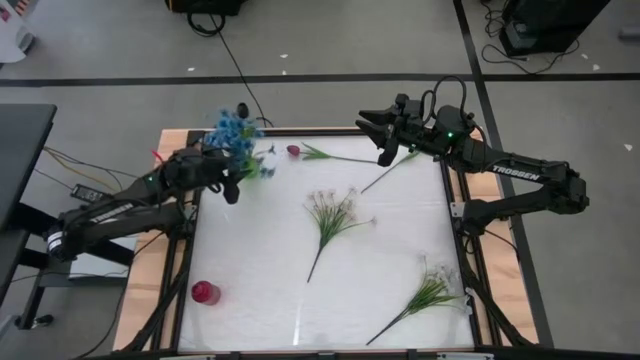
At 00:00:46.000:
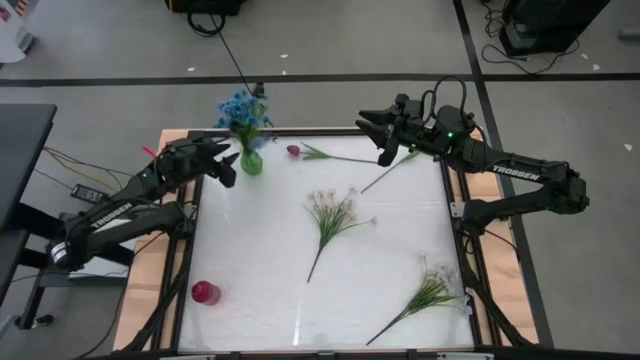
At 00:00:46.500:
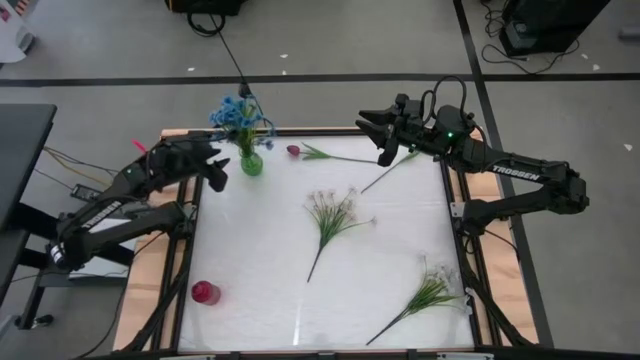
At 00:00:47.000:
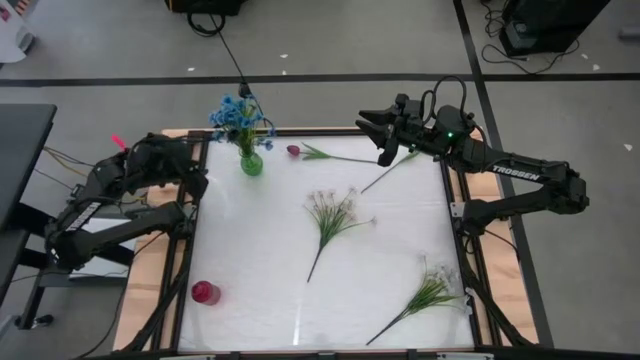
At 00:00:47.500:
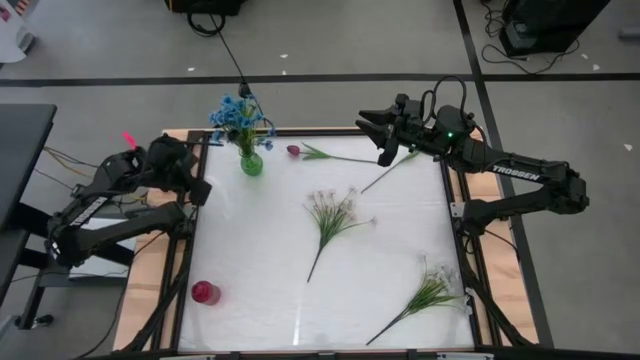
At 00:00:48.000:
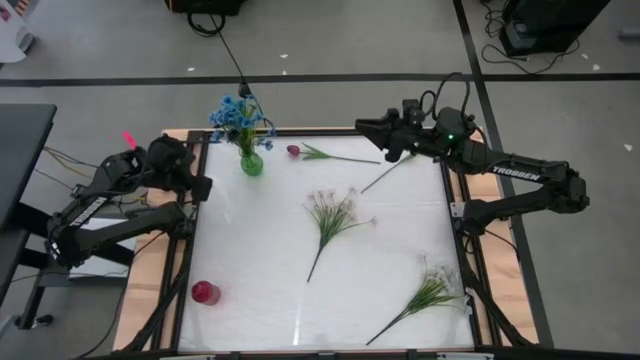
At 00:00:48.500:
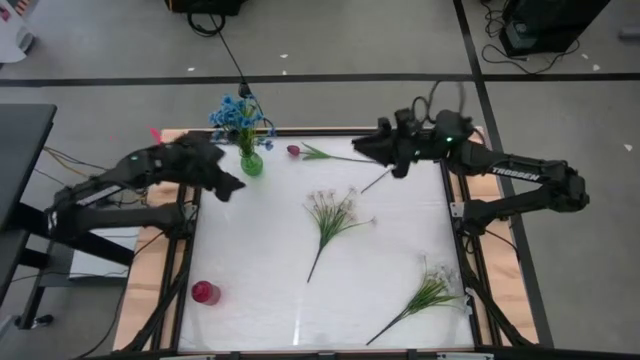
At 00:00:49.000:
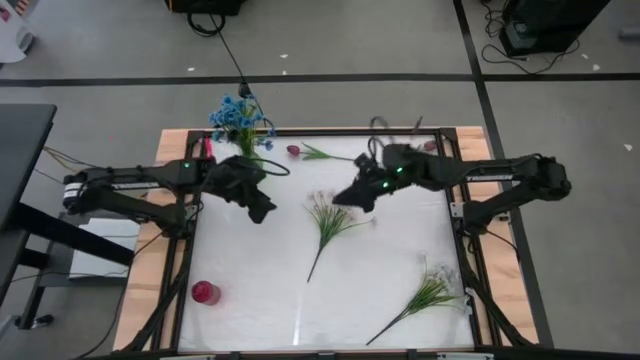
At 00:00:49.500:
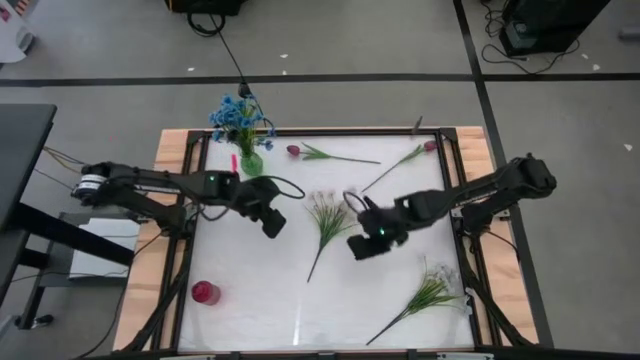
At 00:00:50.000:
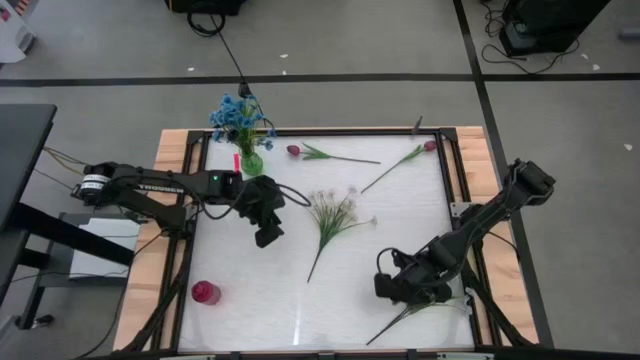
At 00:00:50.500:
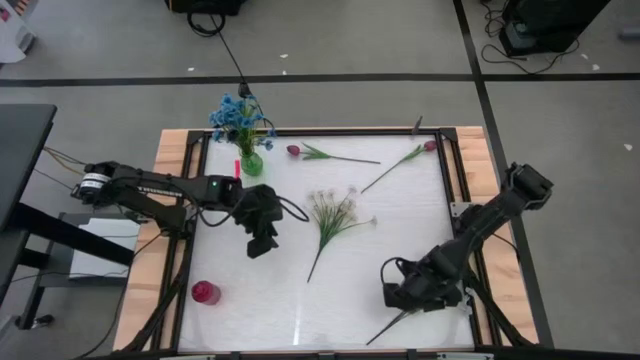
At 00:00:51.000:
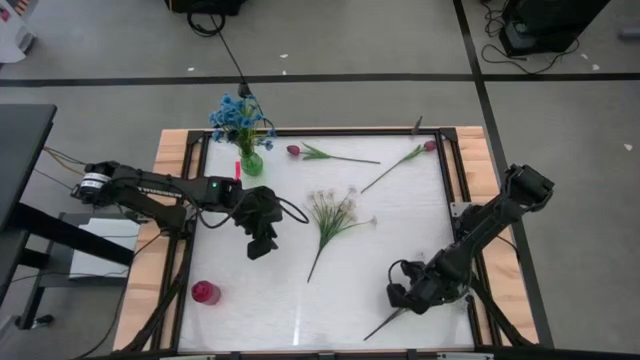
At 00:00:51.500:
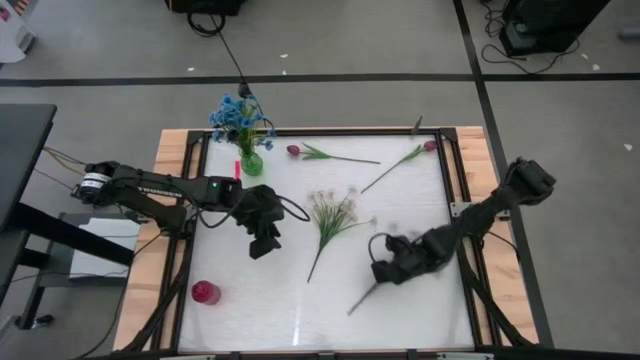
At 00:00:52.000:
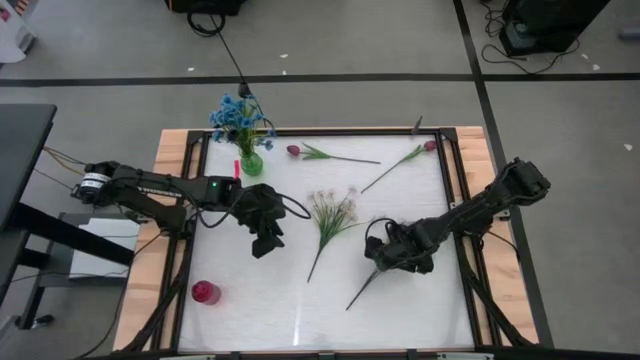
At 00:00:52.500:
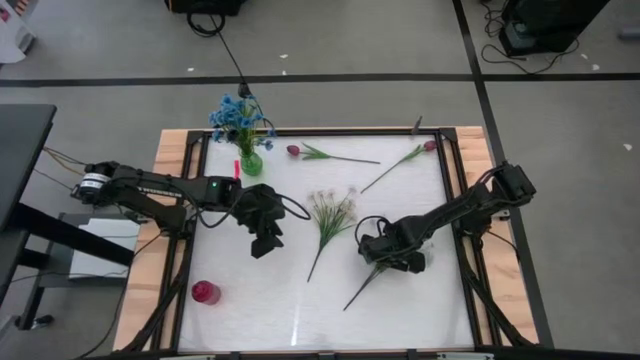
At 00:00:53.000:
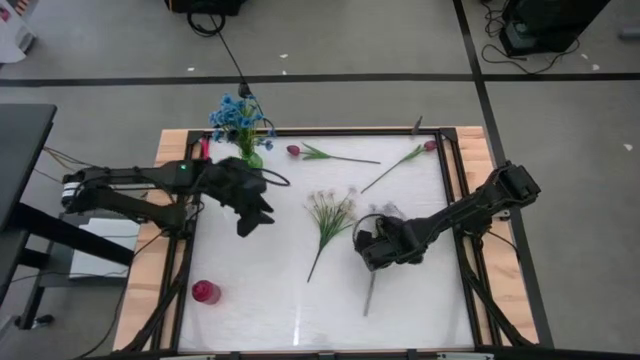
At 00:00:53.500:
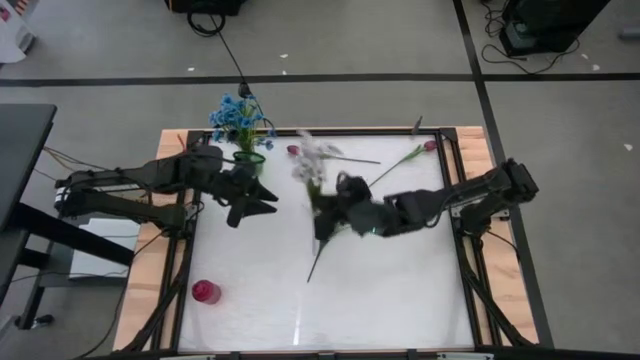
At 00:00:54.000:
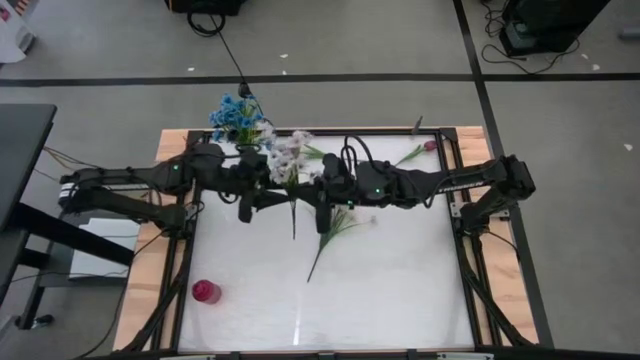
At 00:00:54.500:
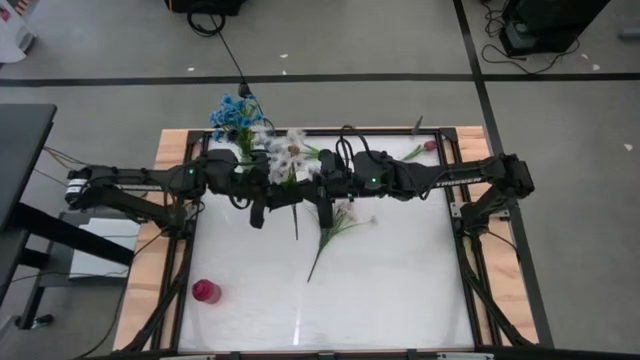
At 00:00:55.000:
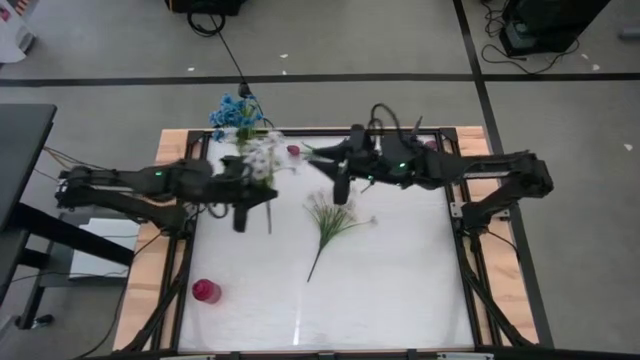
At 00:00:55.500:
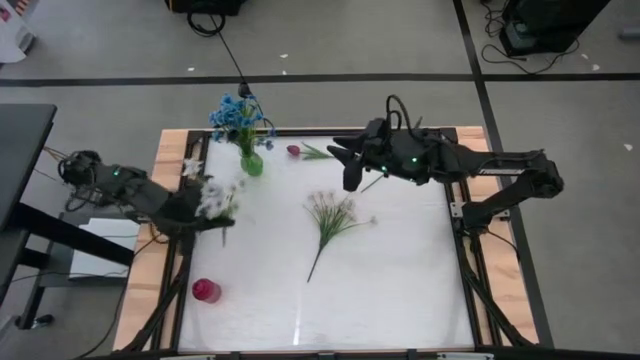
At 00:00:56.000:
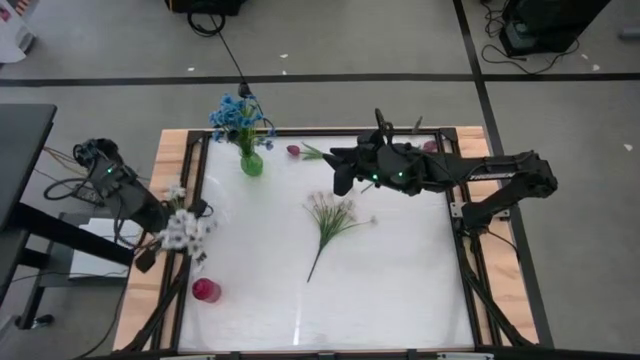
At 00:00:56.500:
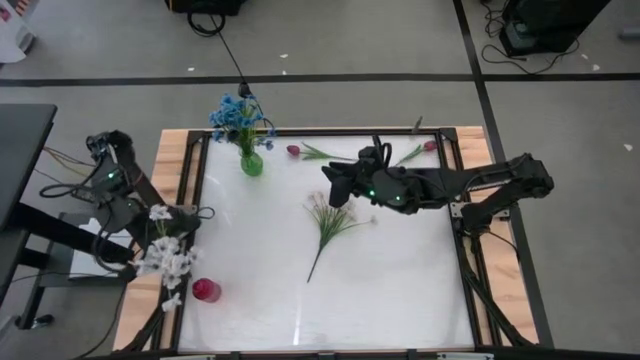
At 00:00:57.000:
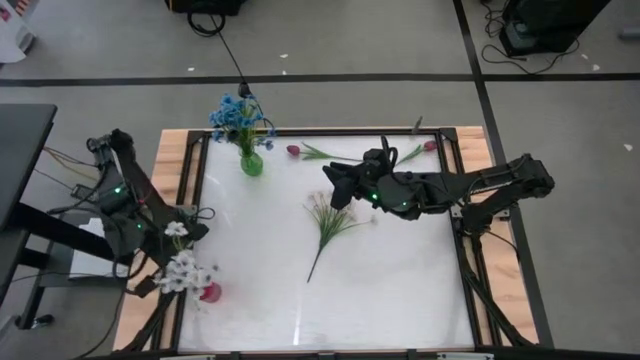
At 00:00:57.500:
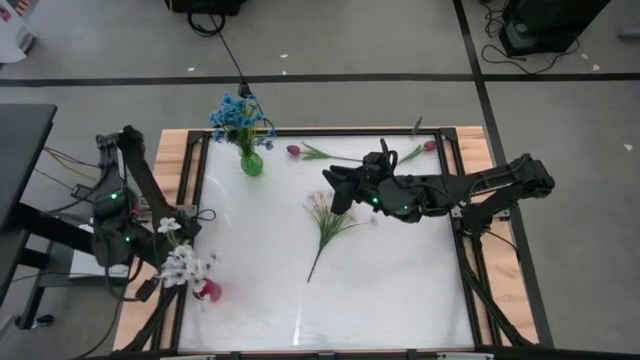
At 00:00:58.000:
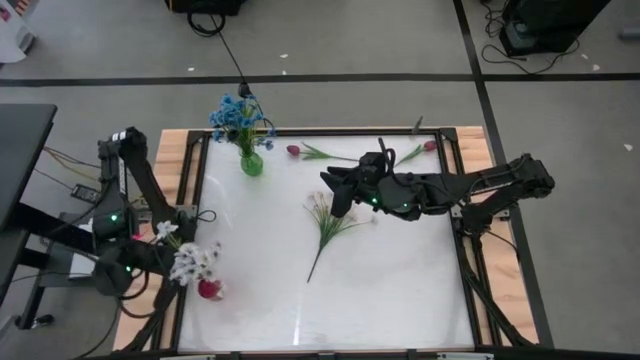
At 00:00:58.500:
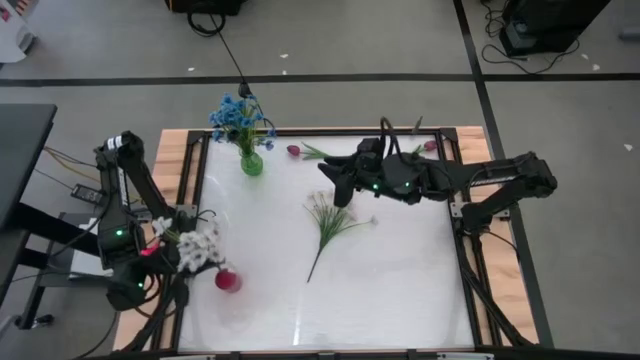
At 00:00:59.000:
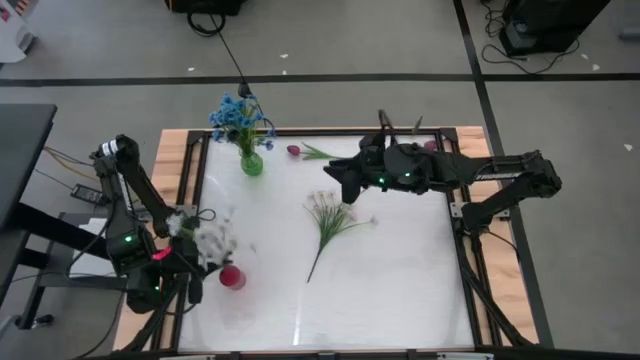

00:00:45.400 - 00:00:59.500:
Task: Sort flowers into vase by color
Put the bottom white flowers into the red vase

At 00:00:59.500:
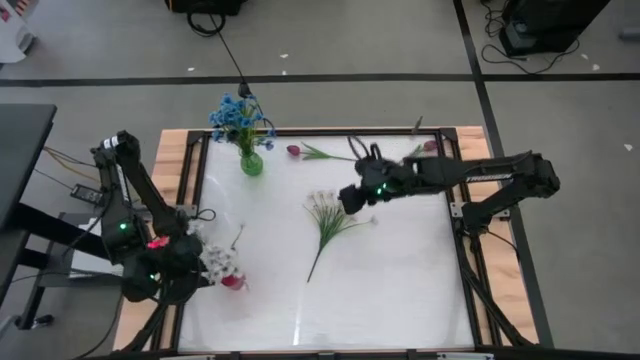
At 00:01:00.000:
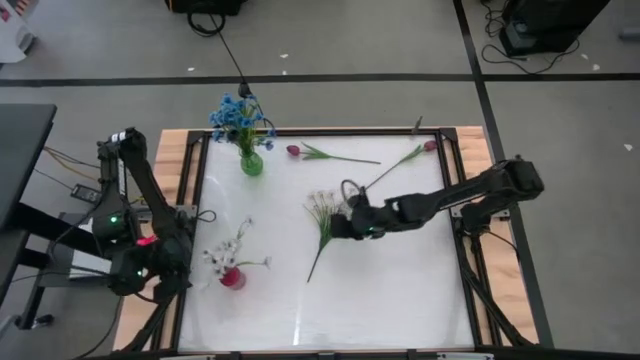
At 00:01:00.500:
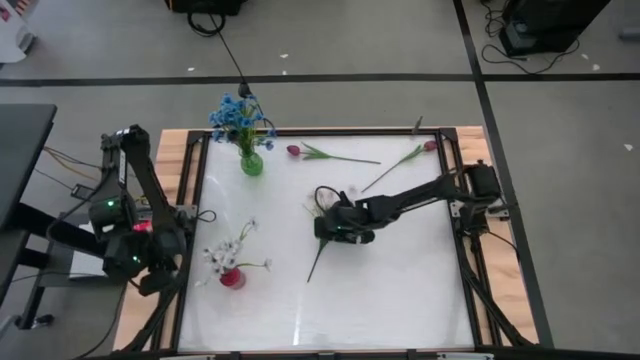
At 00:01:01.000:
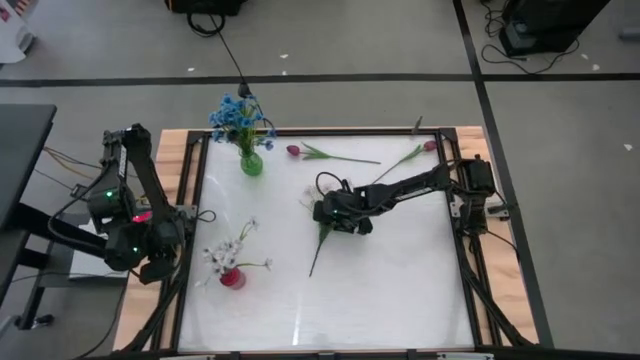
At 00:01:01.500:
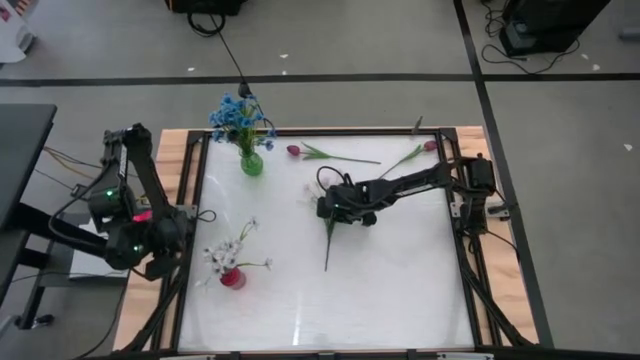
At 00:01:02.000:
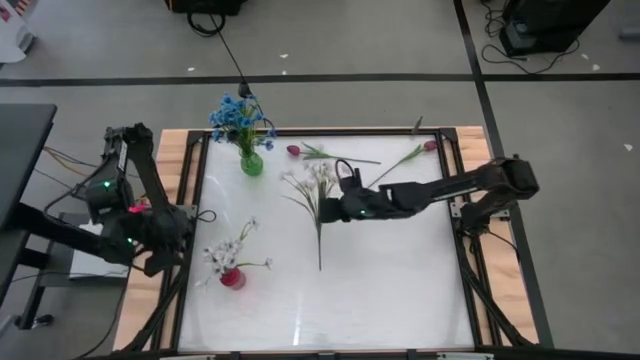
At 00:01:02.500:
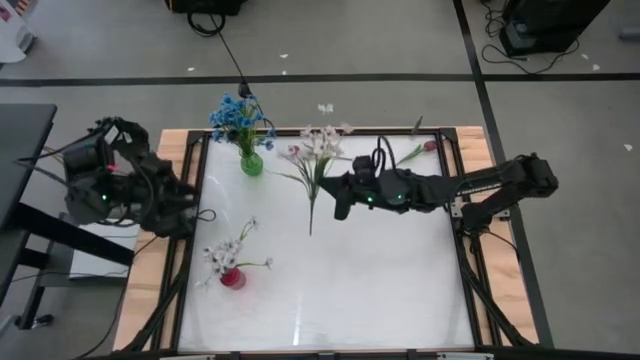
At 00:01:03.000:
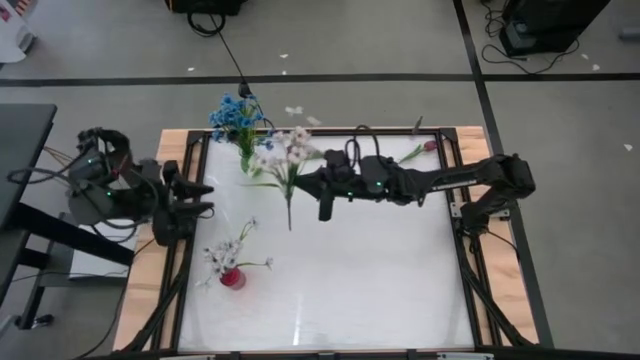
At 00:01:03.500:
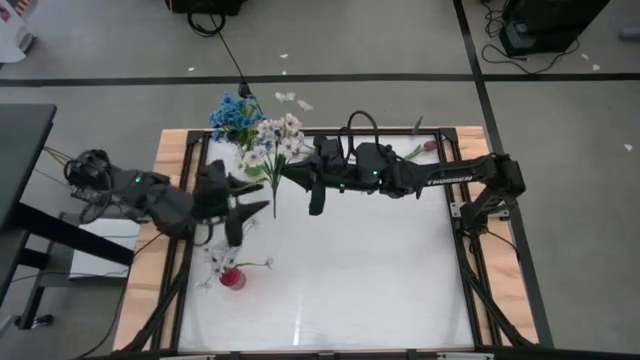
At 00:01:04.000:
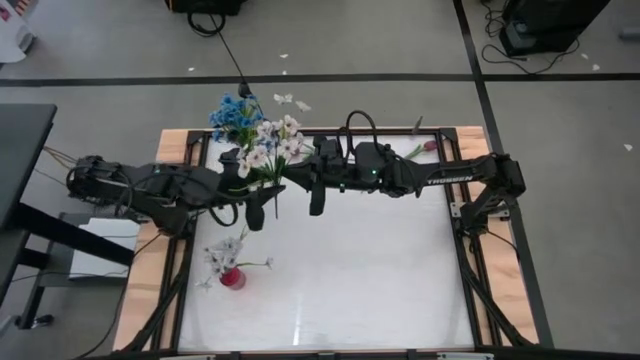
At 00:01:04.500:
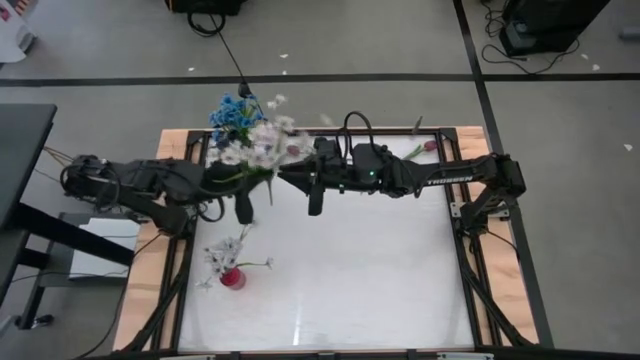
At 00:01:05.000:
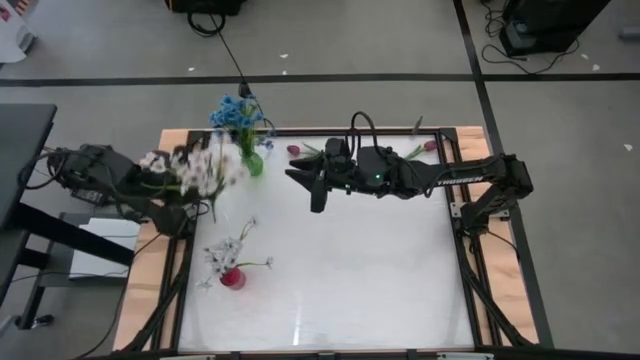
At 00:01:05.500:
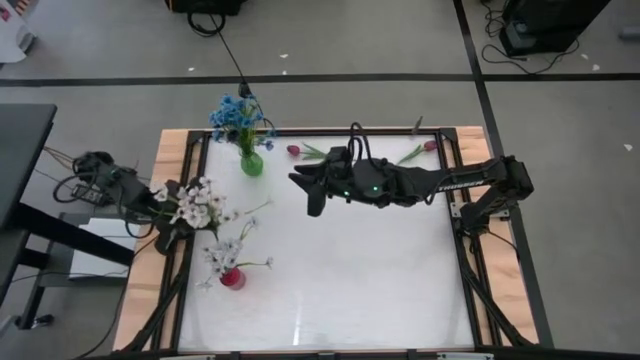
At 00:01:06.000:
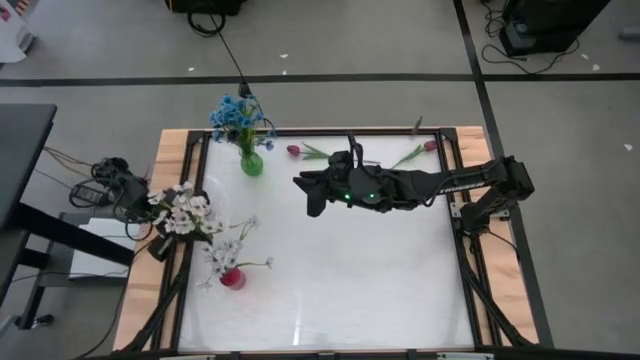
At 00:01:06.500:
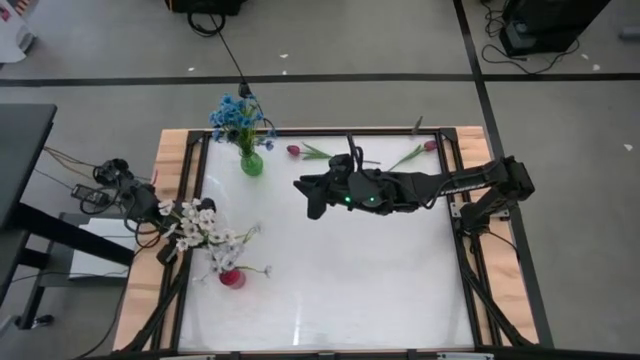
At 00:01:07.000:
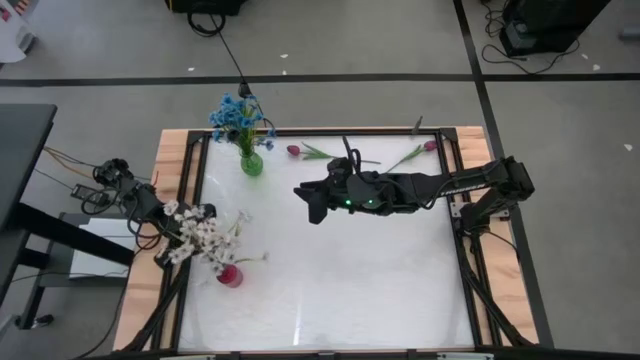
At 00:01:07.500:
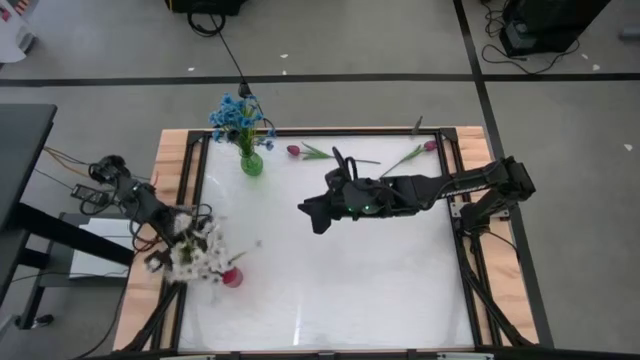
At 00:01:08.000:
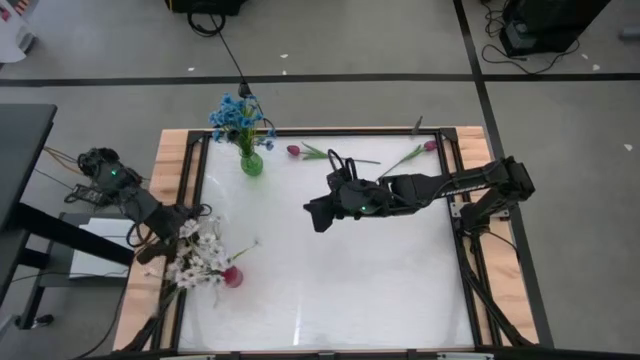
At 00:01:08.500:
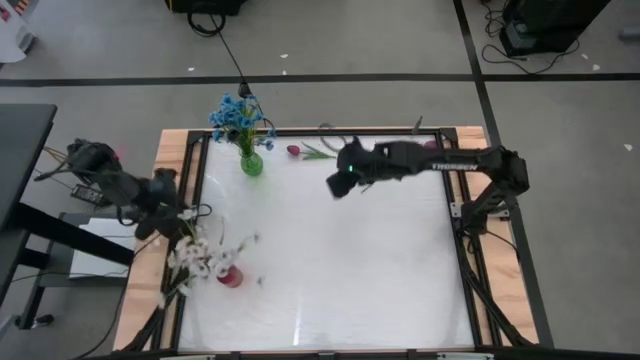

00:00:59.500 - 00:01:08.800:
Put the white flowers into the red vase
